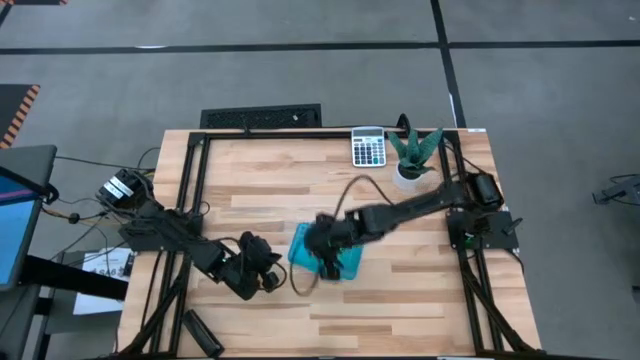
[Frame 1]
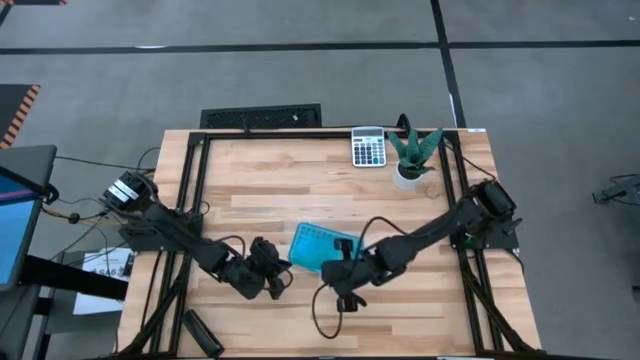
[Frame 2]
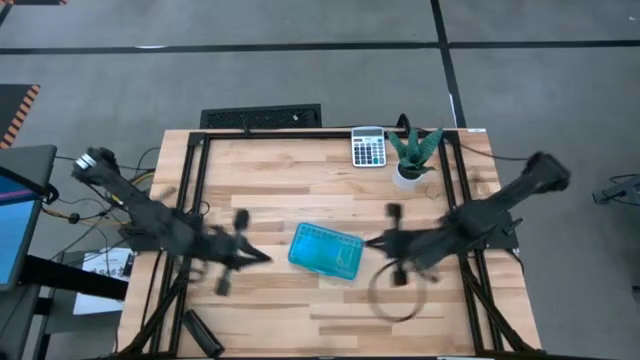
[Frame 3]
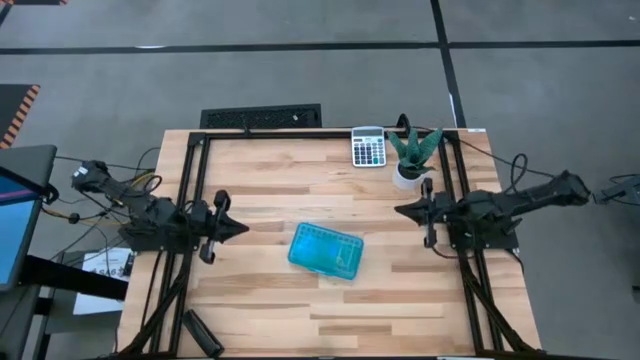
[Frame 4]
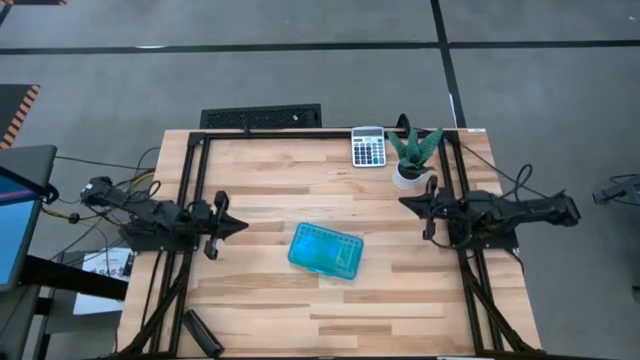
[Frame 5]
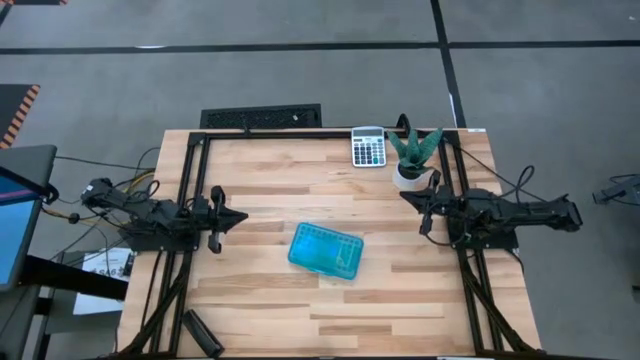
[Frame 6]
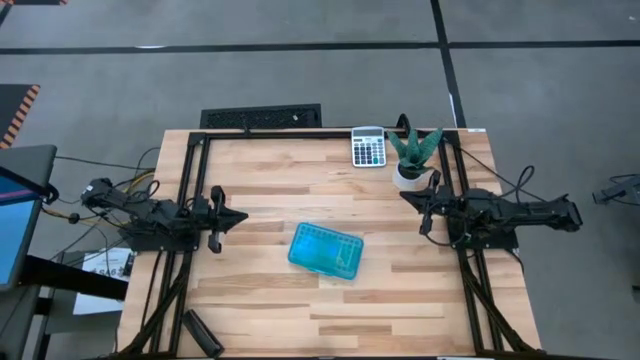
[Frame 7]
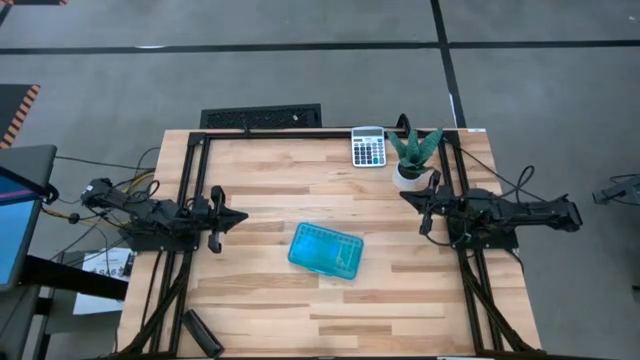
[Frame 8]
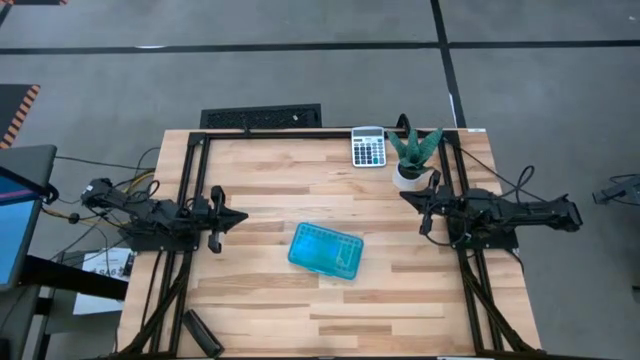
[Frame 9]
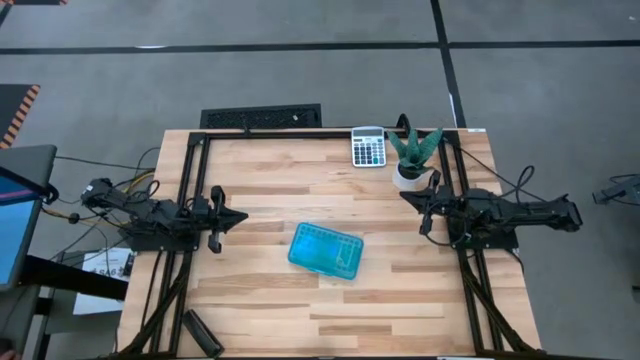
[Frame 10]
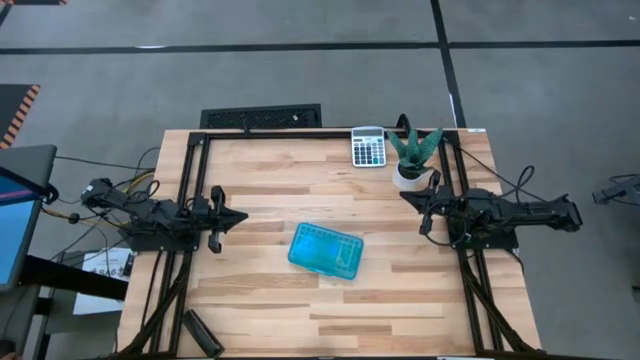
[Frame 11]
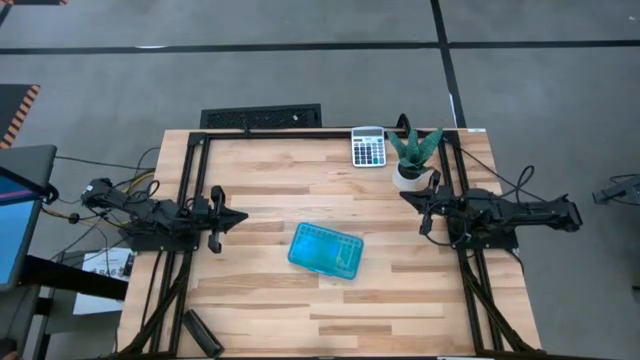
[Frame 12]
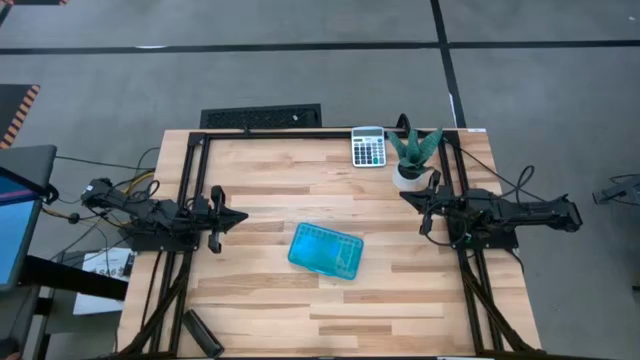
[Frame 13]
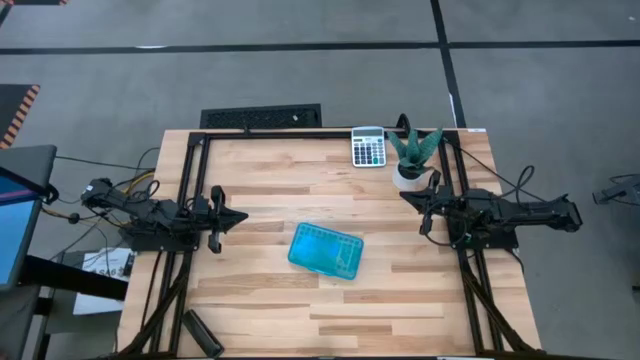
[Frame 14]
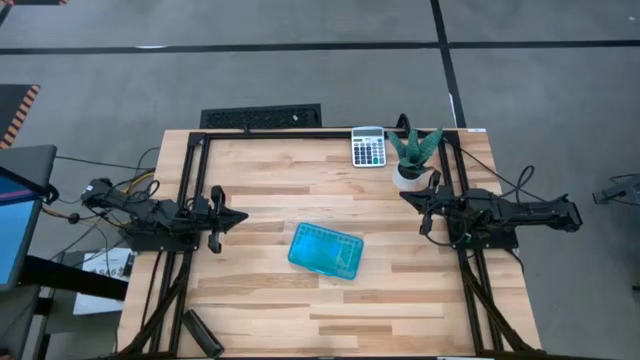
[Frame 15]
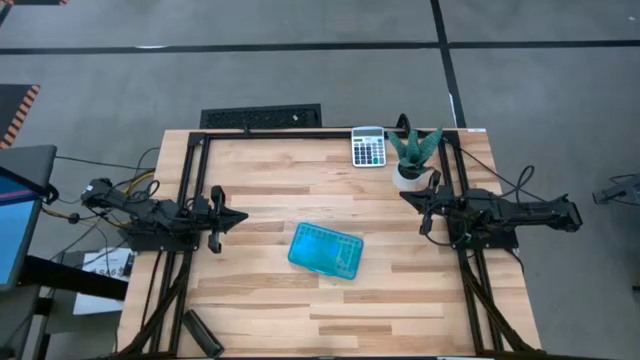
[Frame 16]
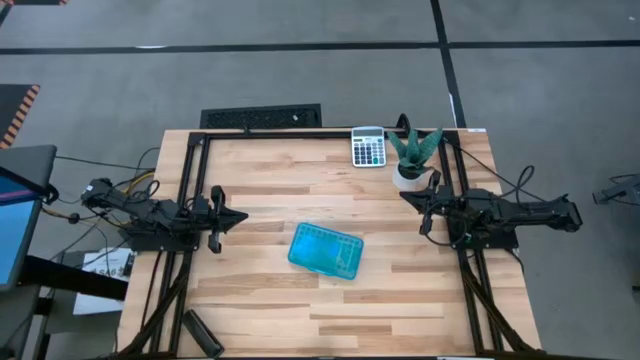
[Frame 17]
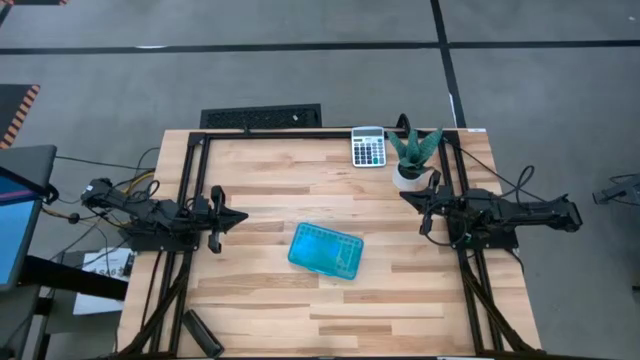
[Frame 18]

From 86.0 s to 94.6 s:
Task: Pack school essentials
Return to Home Position

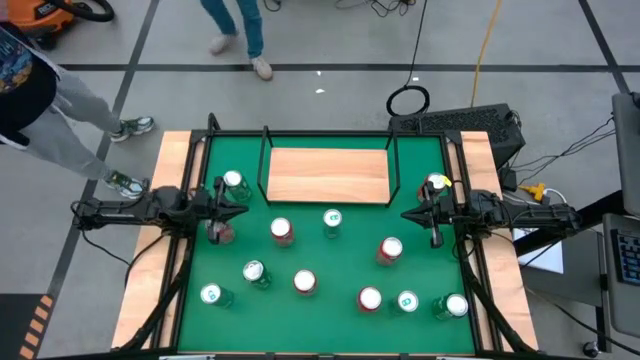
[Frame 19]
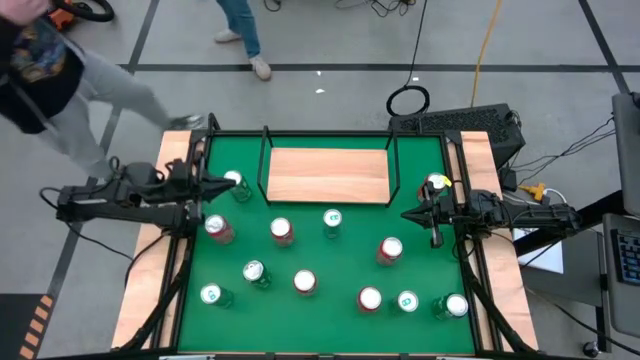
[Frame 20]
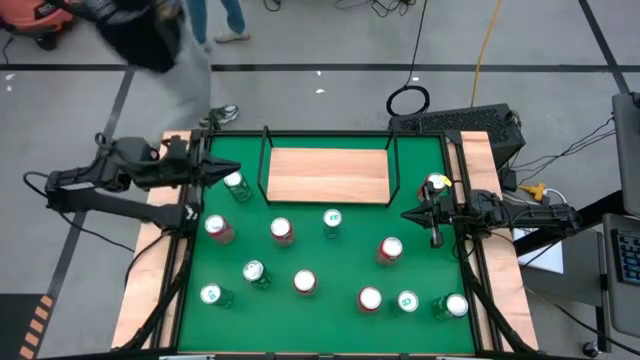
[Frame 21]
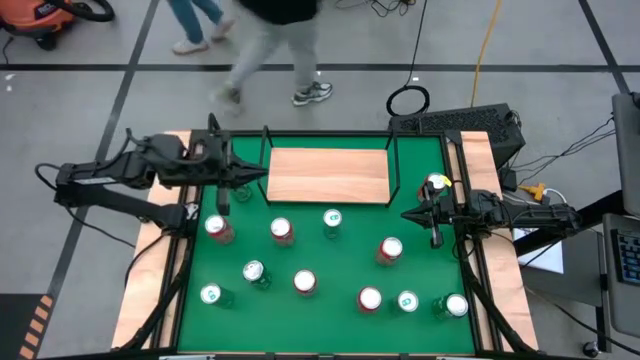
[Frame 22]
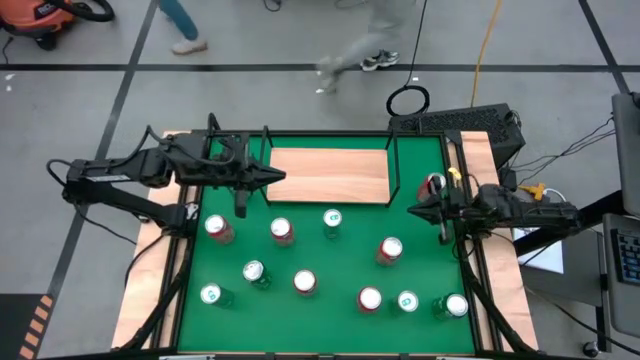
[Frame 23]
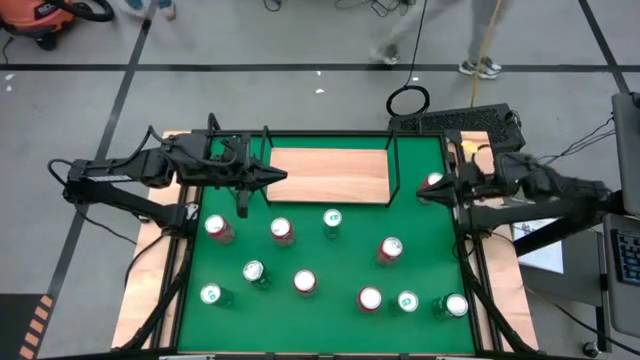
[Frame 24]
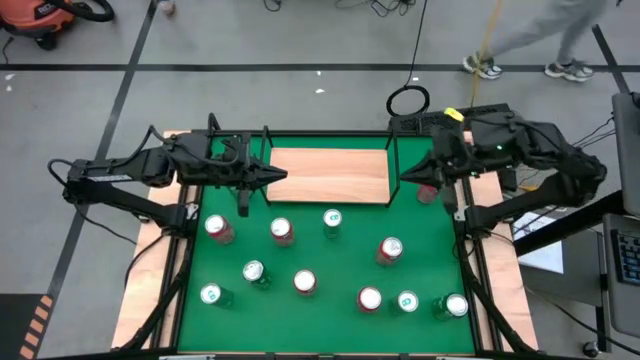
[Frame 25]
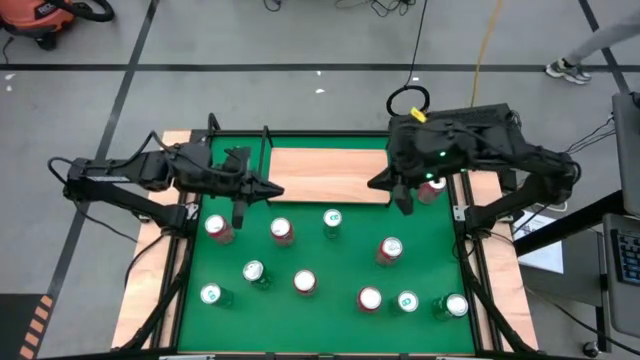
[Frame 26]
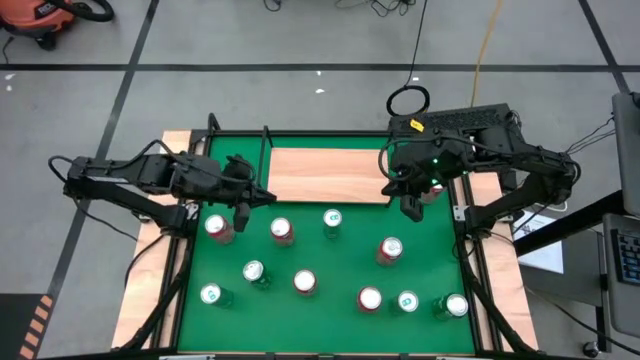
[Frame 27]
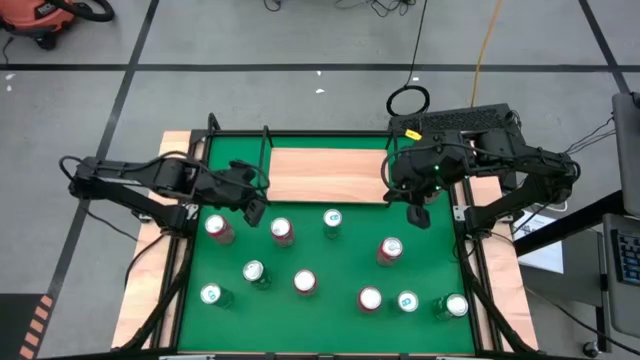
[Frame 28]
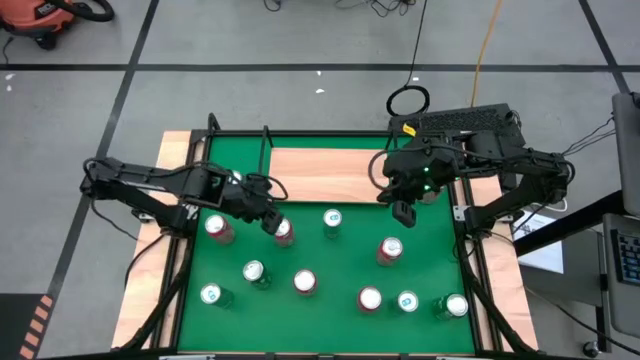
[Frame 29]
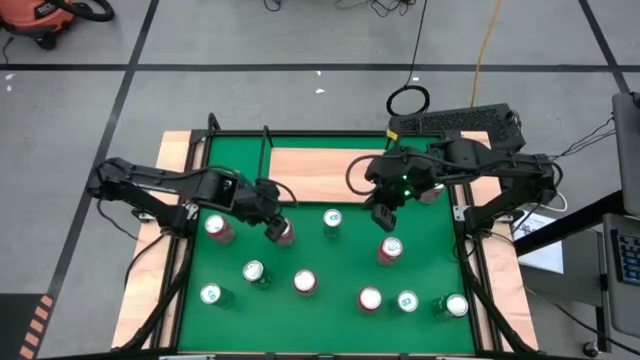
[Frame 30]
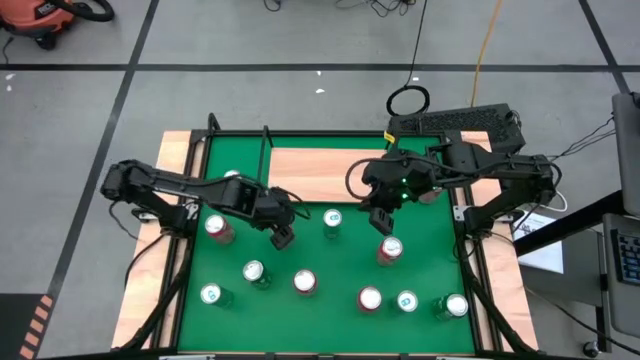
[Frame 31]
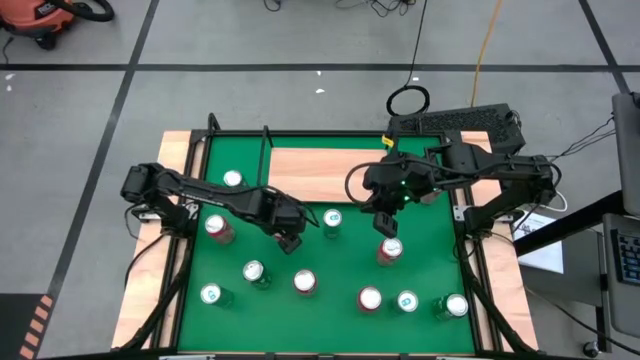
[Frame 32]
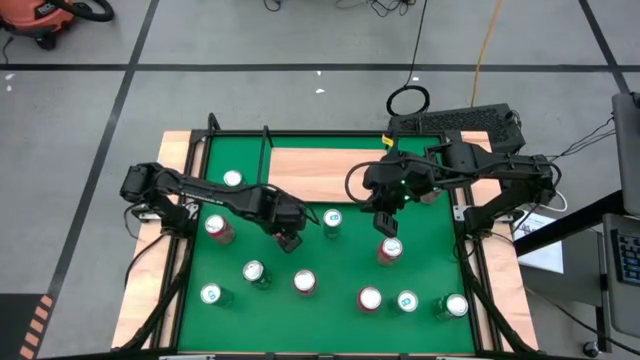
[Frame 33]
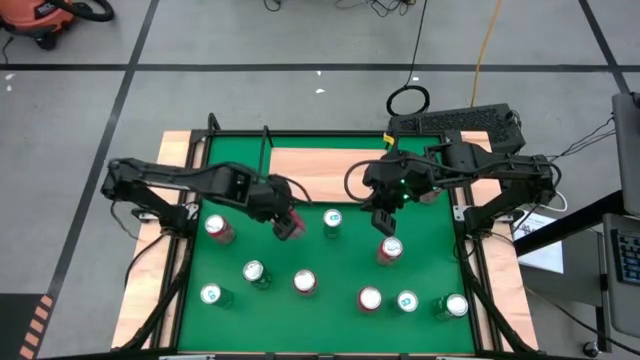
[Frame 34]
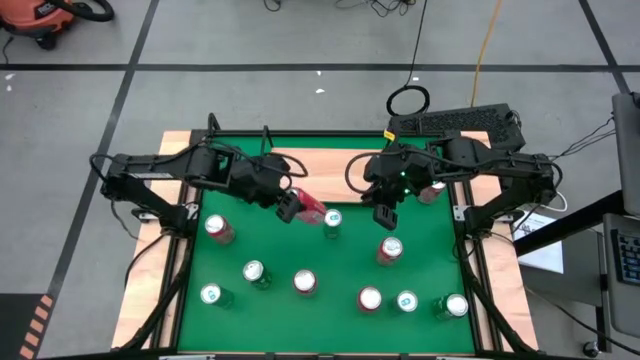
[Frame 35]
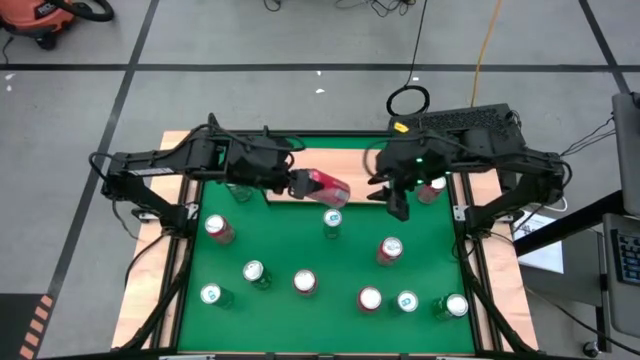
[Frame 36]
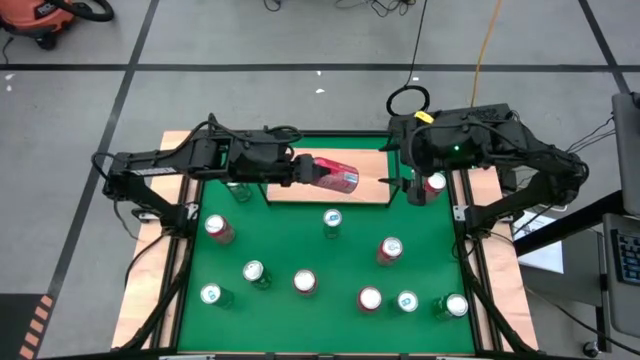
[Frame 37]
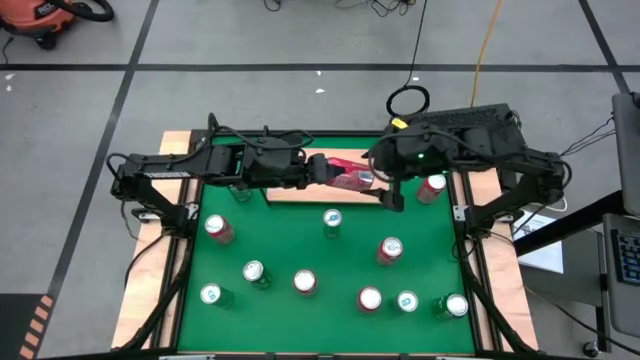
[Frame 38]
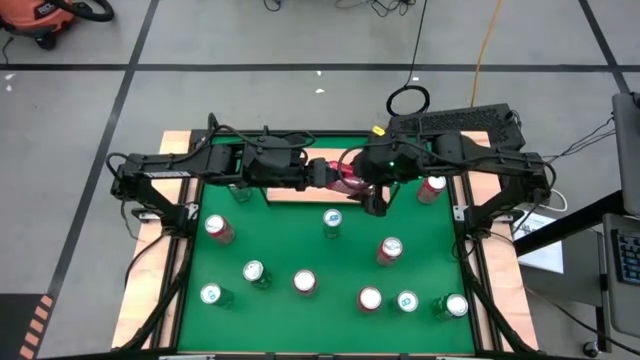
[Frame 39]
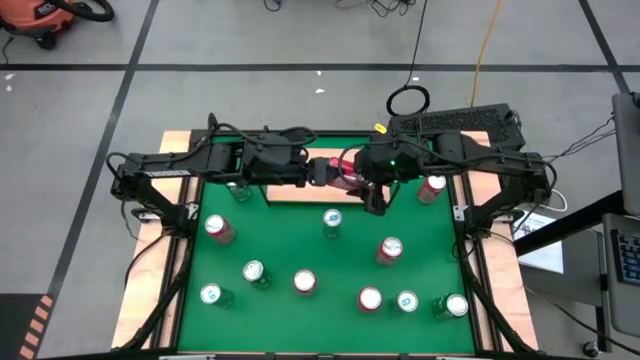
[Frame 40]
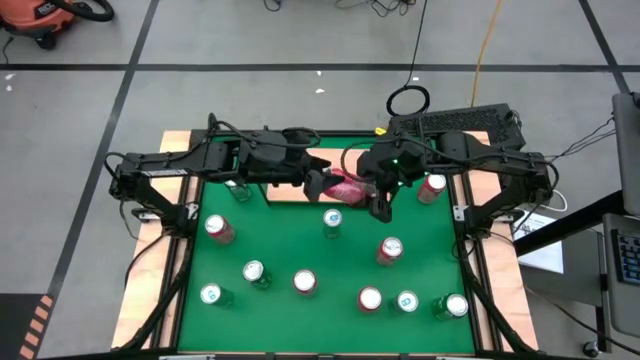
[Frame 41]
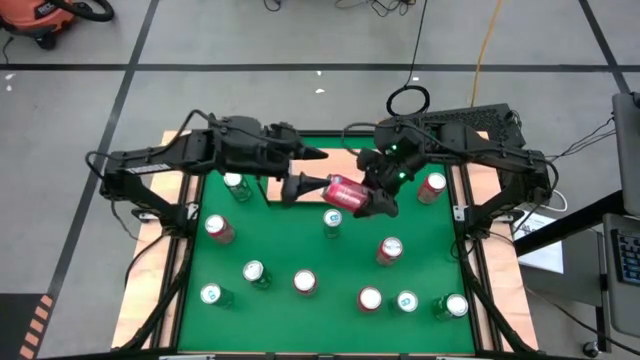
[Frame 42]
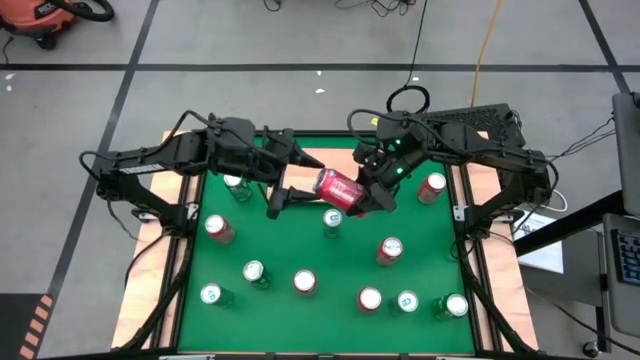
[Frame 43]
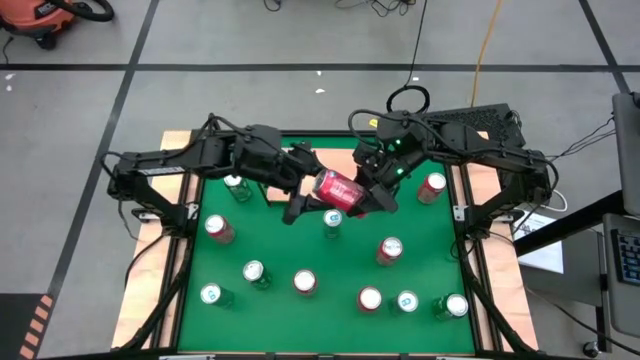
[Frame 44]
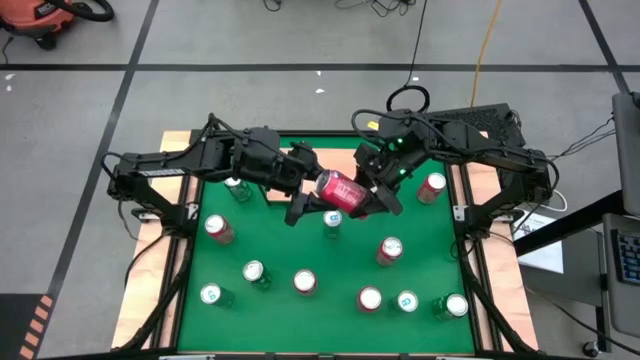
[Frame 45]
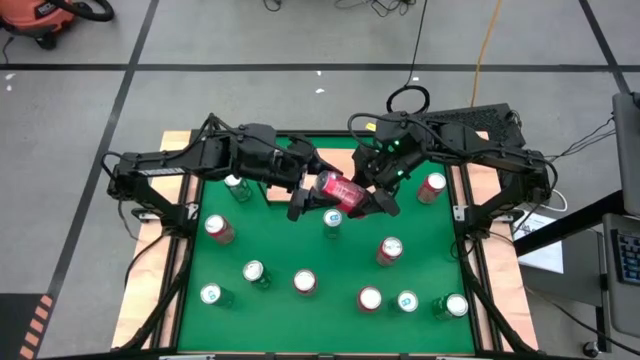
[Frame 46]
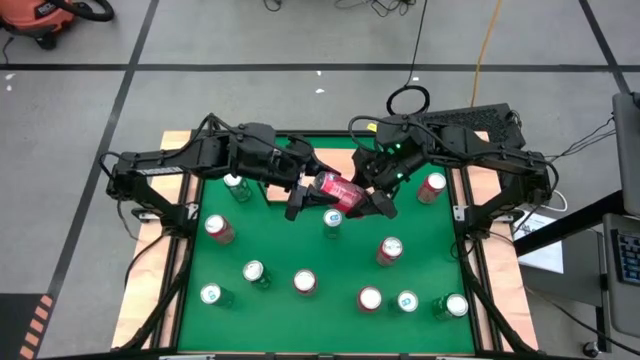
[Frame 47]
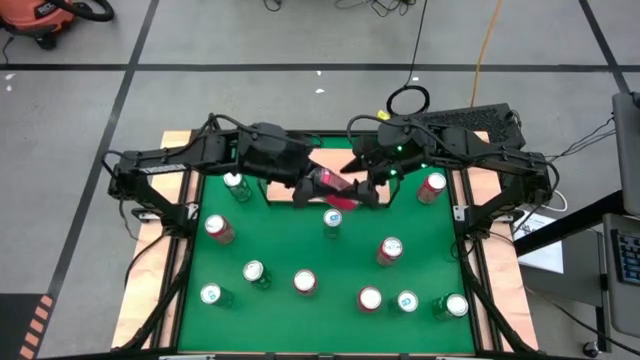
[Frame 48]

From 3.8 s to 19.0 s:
Task: Place canned beverage on shelf
Put the red soda can on the shelf
